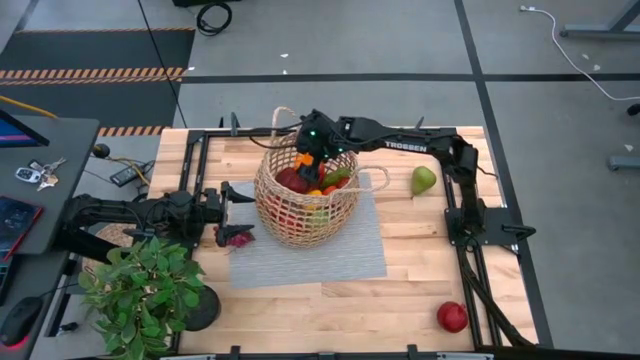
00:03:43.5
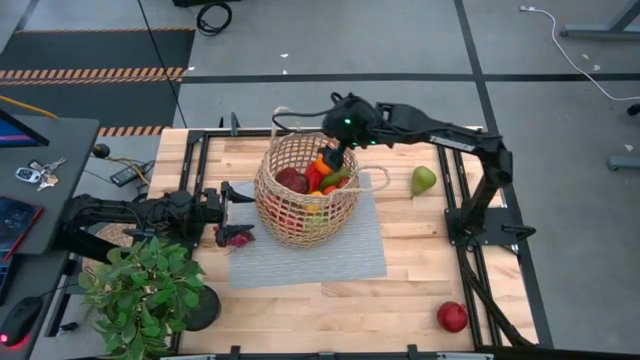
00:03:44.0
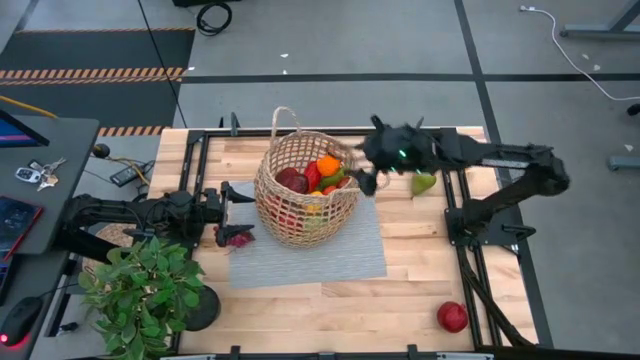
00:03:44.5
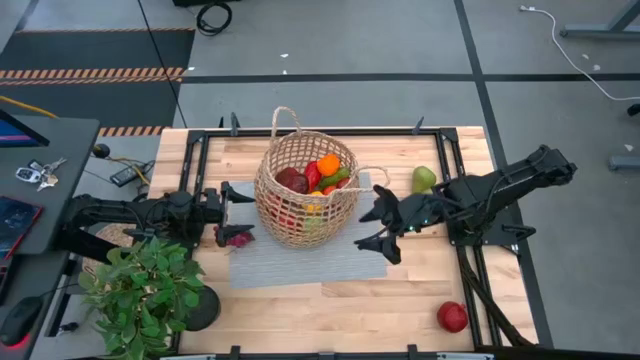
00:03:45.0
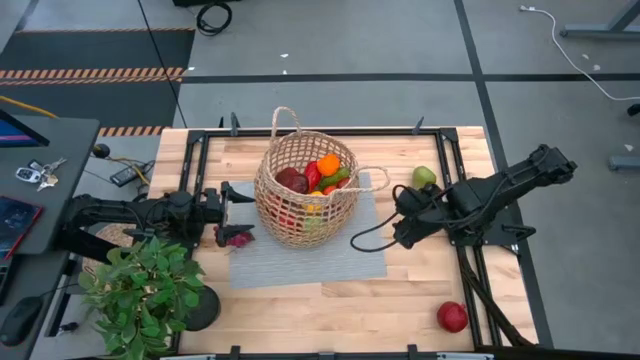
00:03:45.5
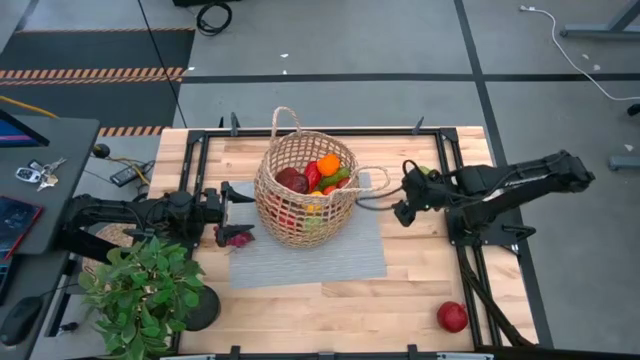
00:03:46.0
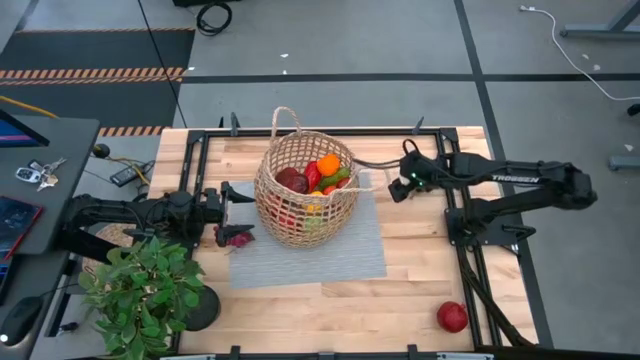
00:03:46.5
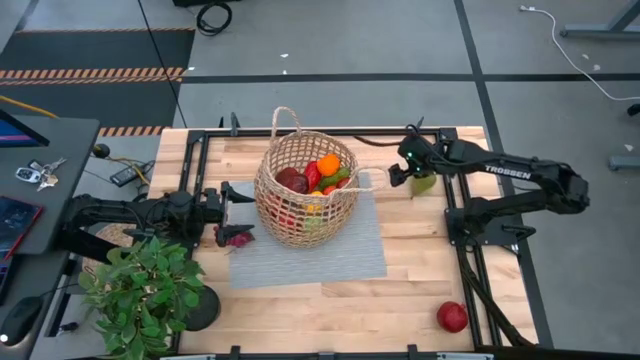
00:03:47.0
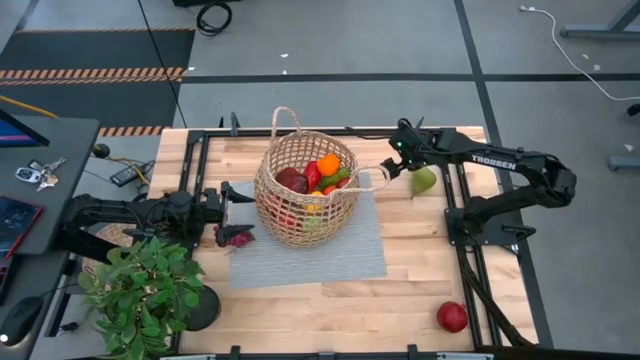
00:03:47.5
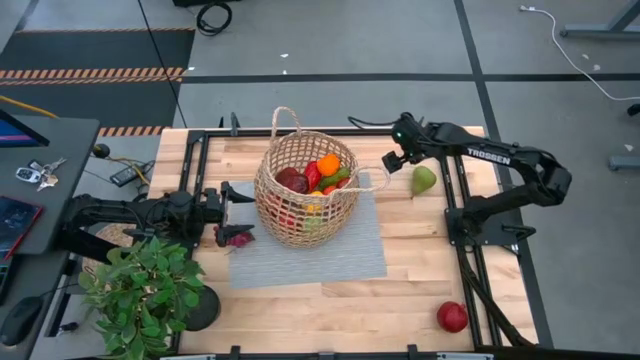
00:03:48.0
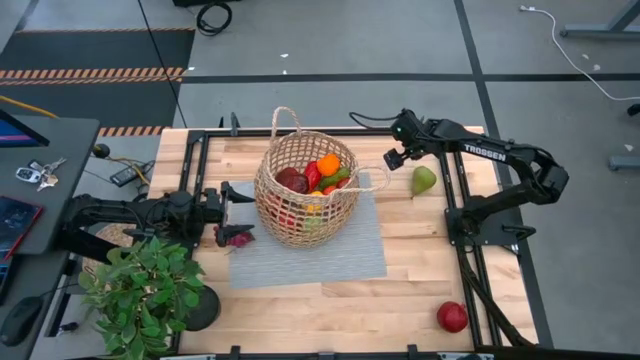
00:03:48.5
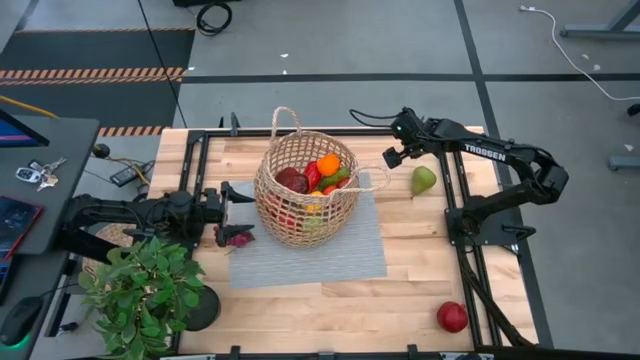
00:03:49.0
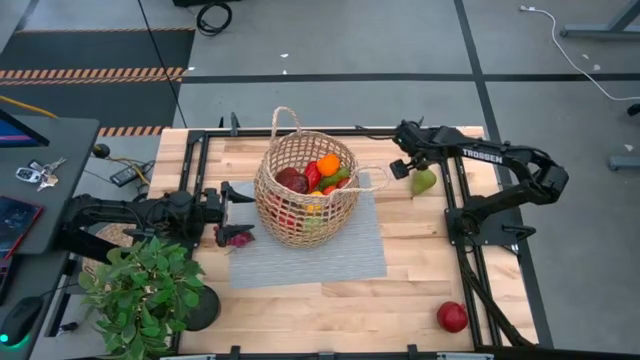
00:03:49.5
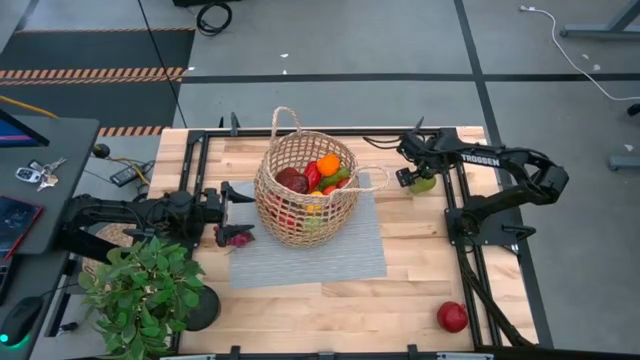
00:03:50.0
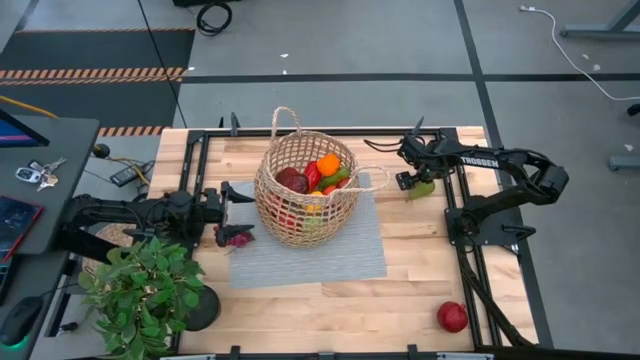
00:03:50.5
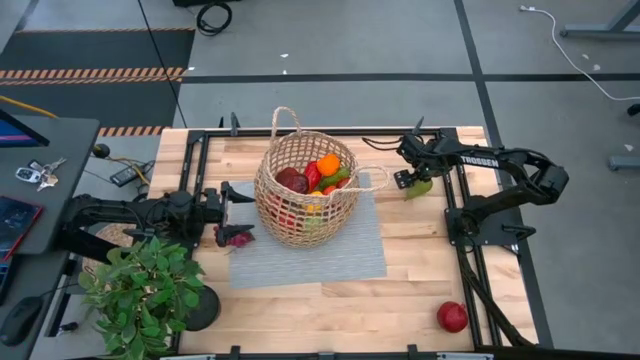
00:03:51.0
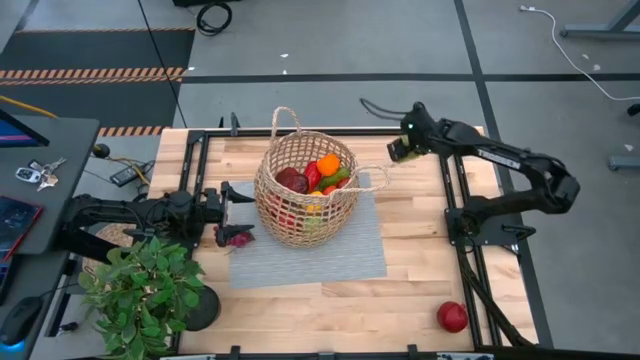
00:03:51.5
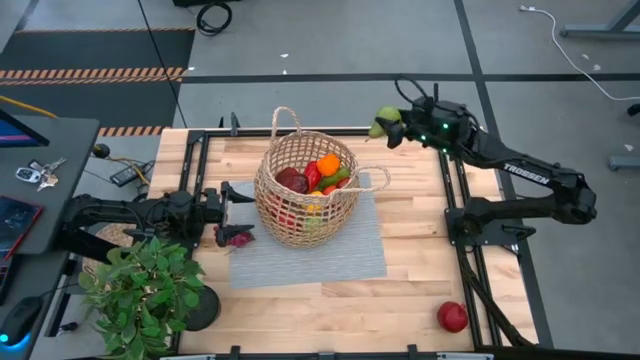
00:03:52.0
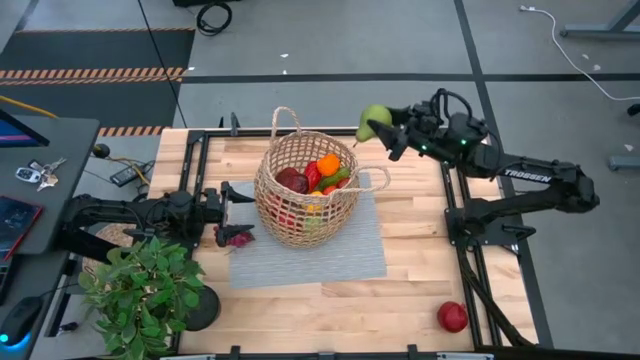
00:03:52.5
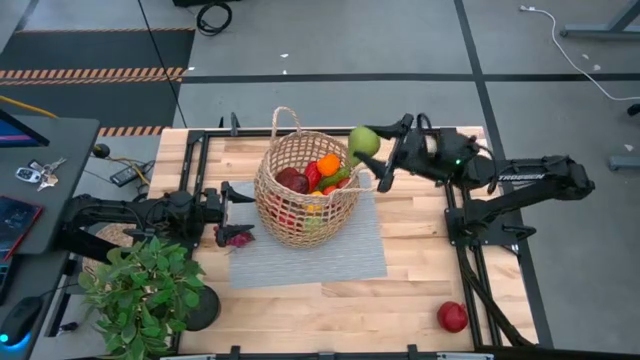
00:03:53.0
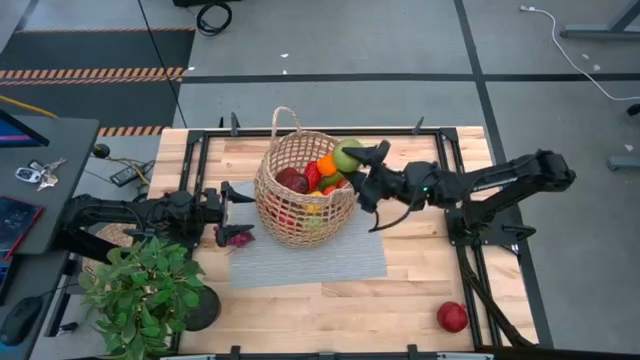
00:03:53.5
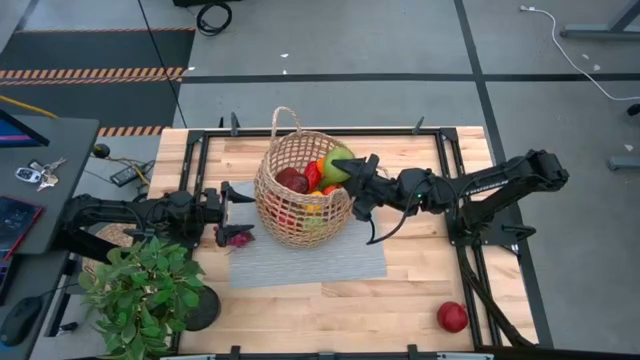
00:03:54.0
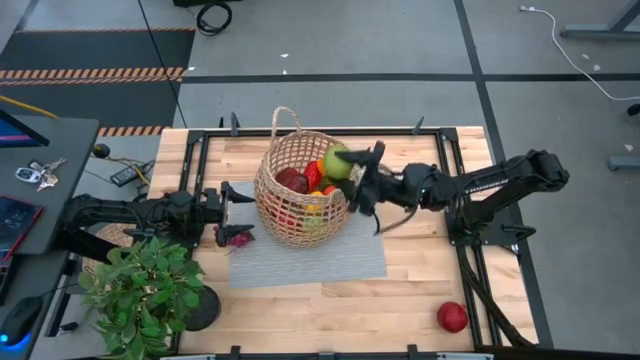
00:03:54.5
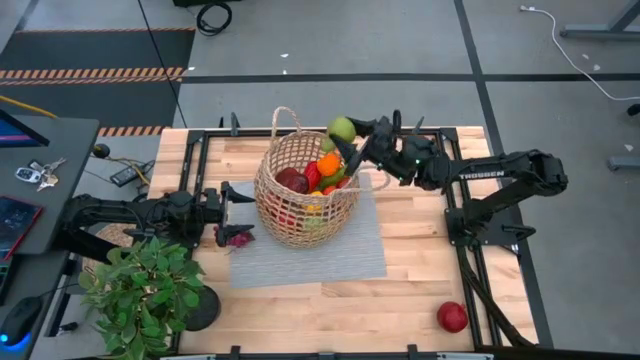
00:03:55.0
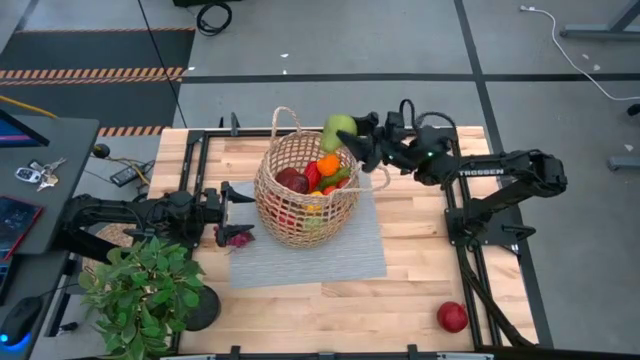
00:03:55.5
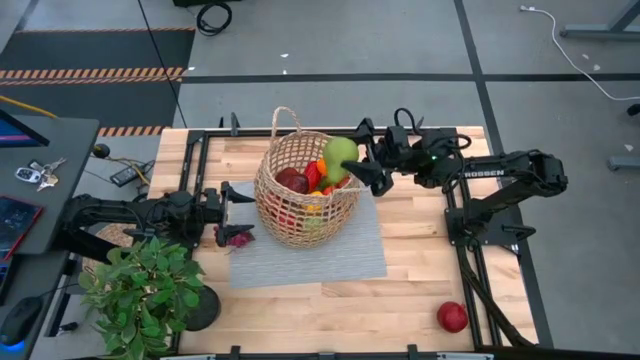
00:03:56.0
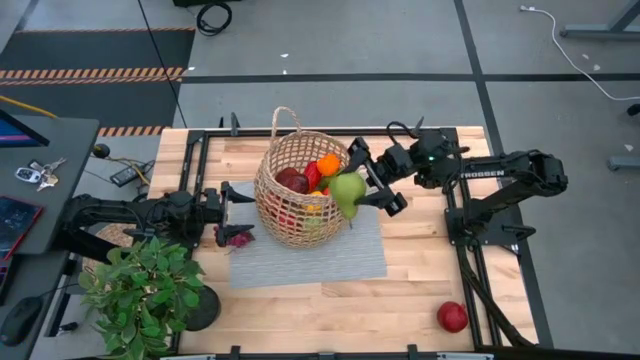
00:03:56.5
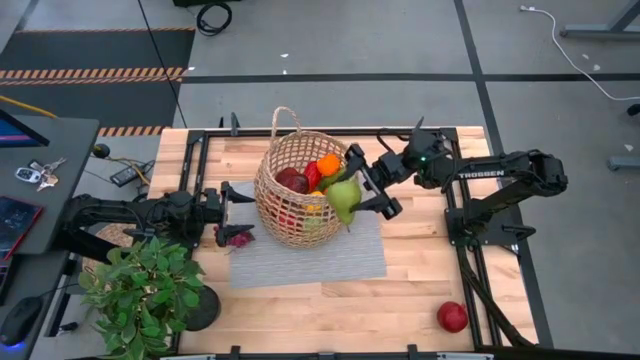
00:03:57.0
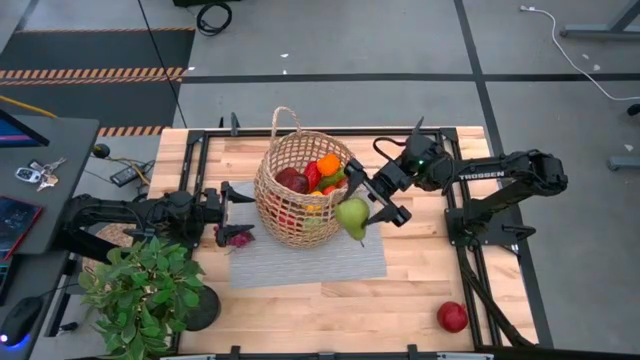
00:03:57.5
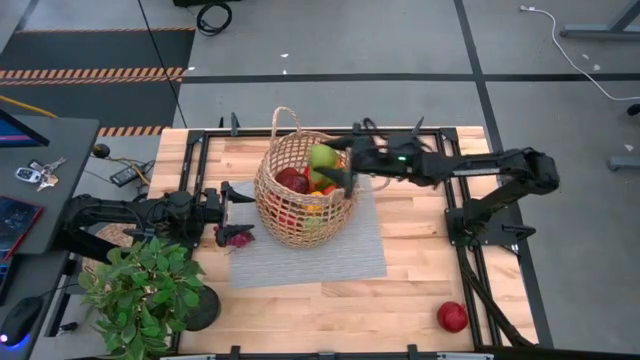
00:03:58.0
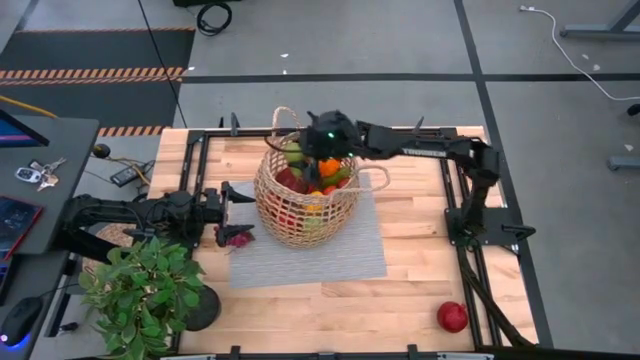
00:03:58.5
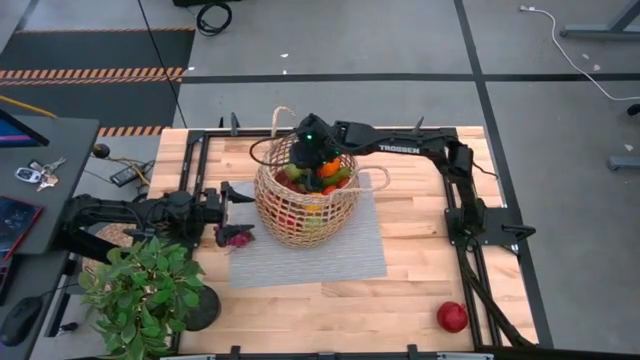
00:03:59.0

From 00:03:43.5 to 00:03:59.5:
Task: Build produce basket
Put the green pear into the brown basket

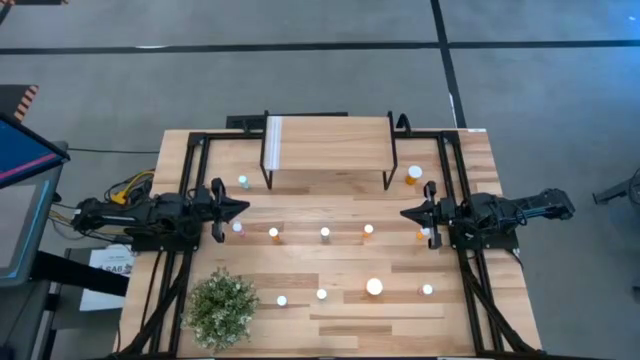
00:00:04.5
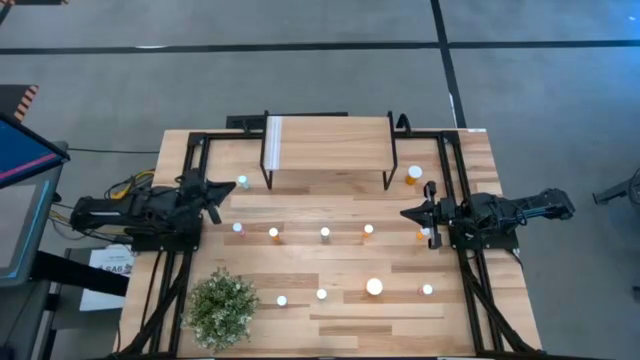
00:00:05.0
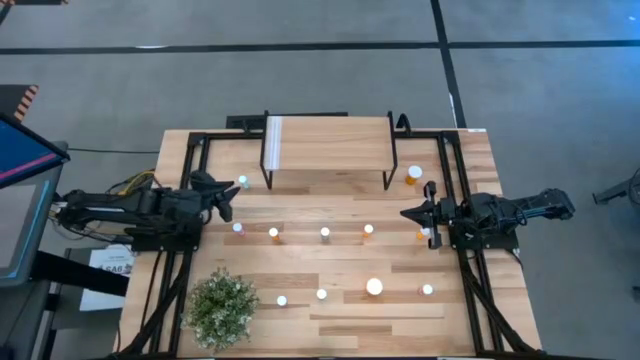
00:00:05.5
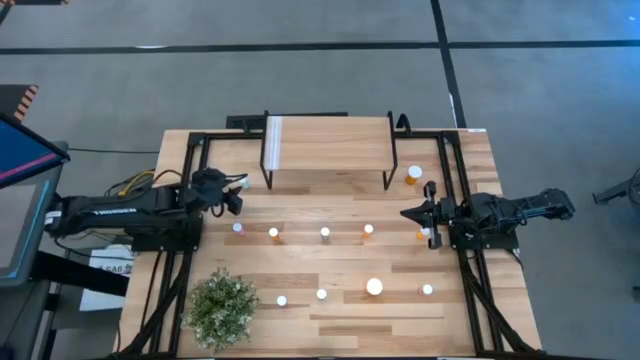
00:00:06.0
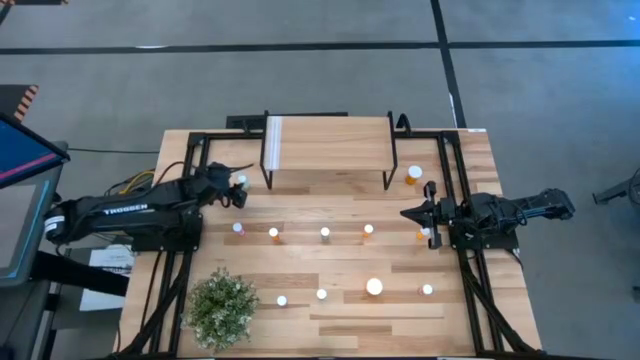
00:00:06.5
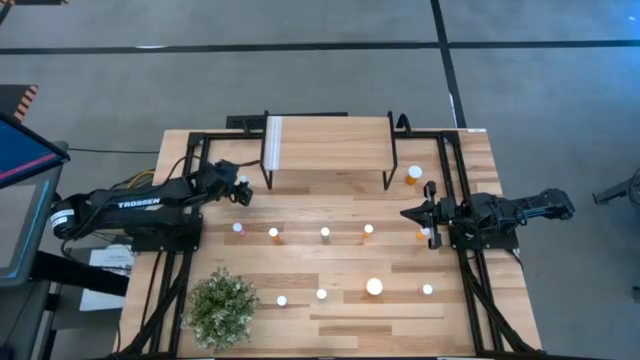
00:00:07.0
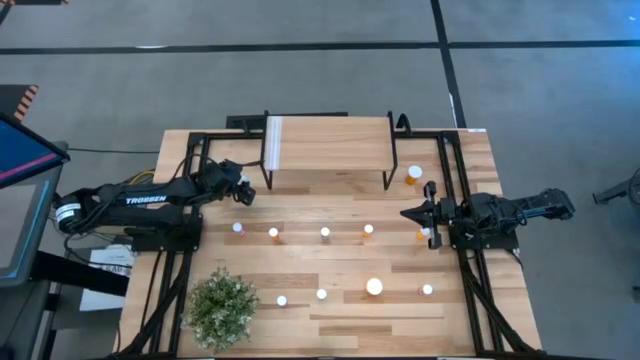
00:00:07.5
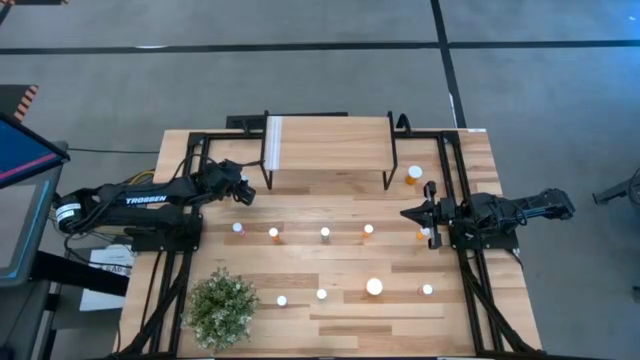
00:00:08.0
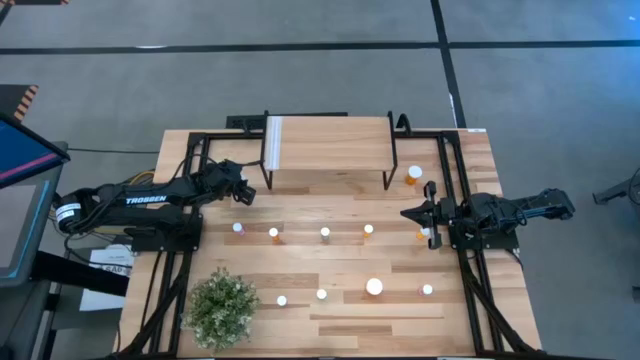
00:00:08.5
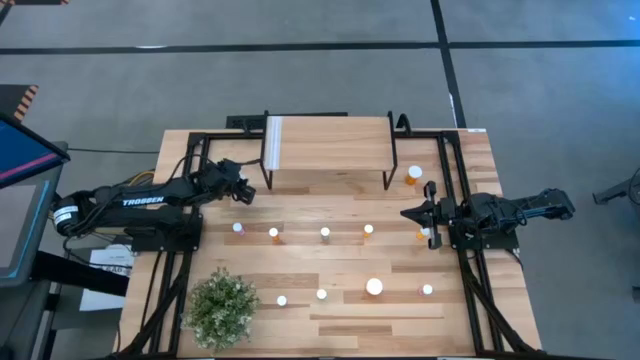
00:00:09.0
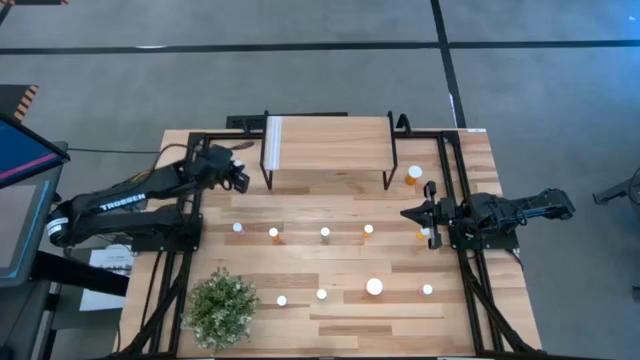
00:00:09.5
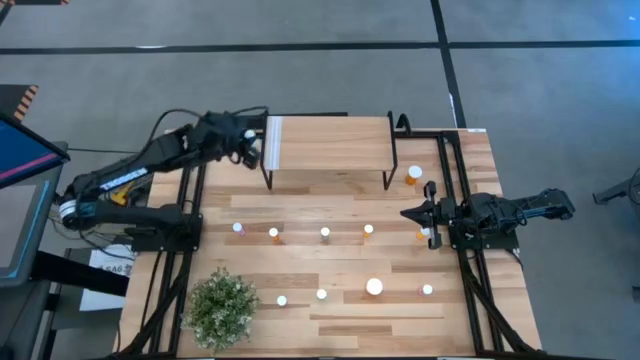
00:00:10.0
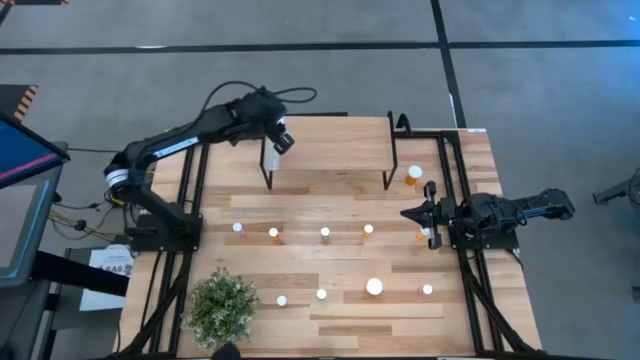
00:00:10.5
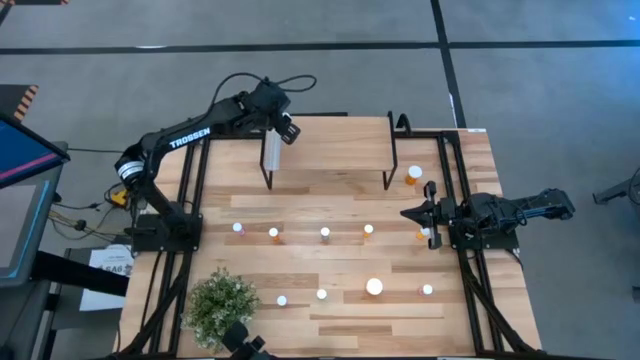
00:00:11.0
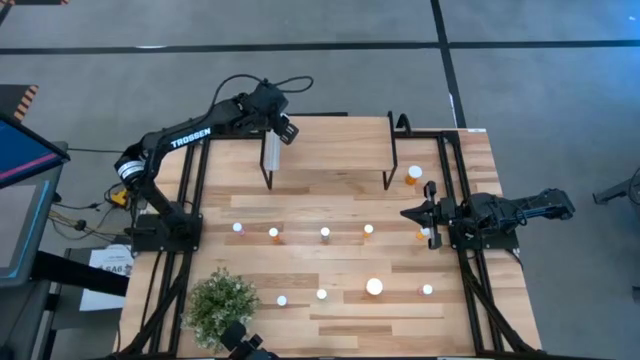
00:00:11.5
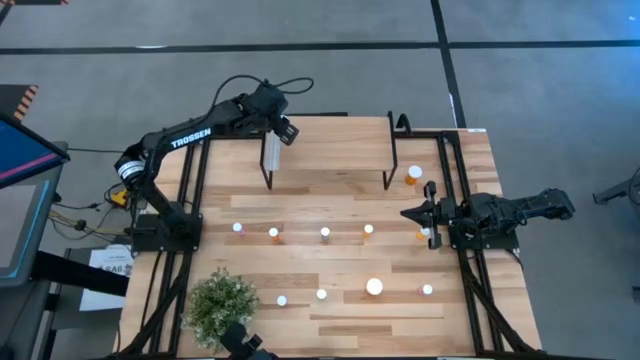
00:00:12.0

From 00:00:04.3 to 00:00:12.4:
Task: Pick and place medicine bottles onto shelf by color
Put the top left blue pill bottle on the shelf
